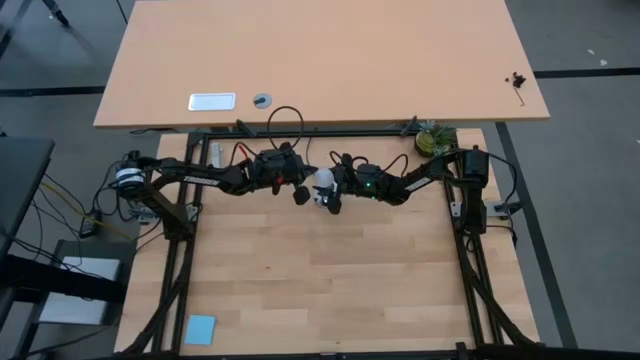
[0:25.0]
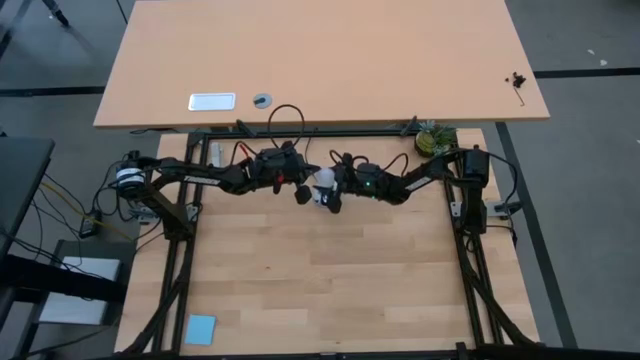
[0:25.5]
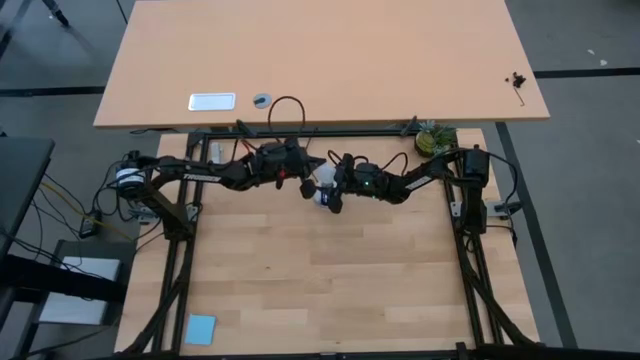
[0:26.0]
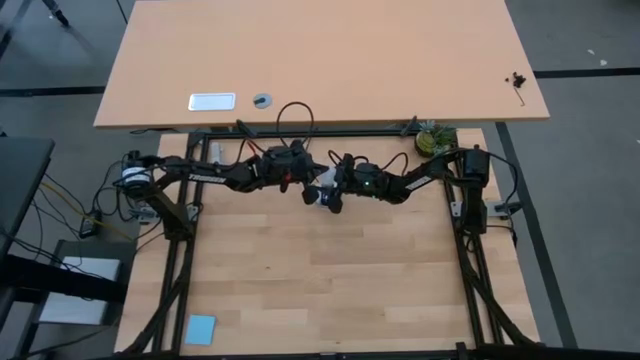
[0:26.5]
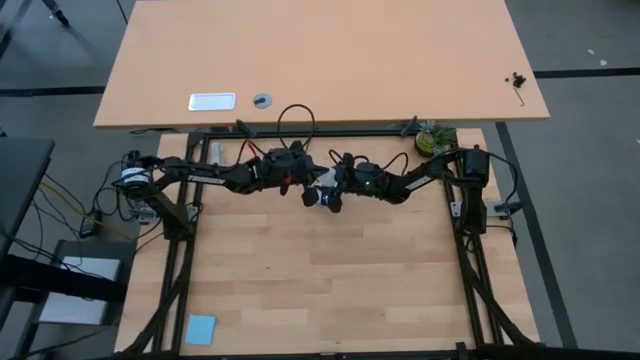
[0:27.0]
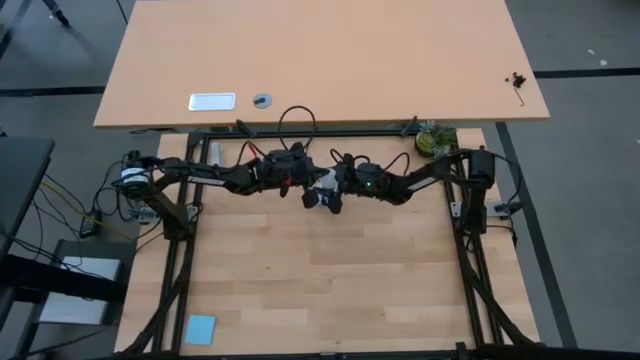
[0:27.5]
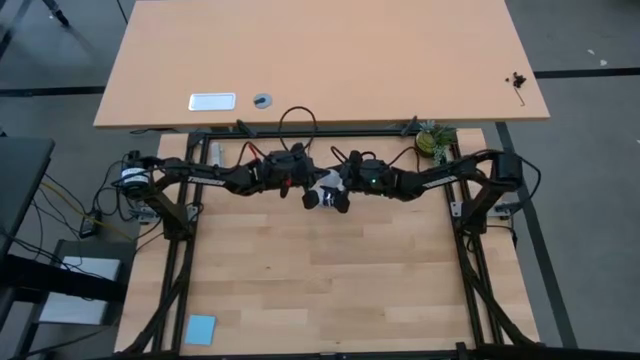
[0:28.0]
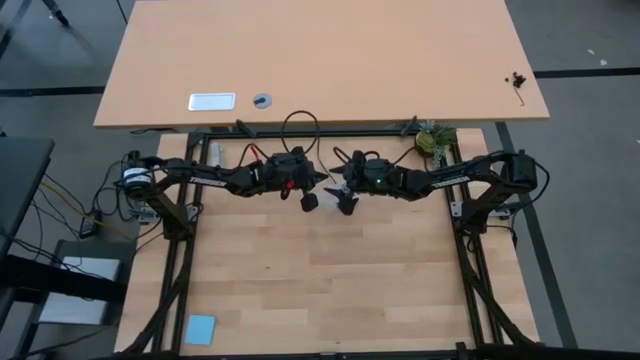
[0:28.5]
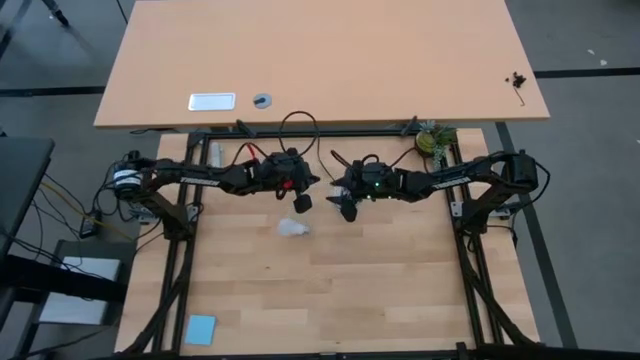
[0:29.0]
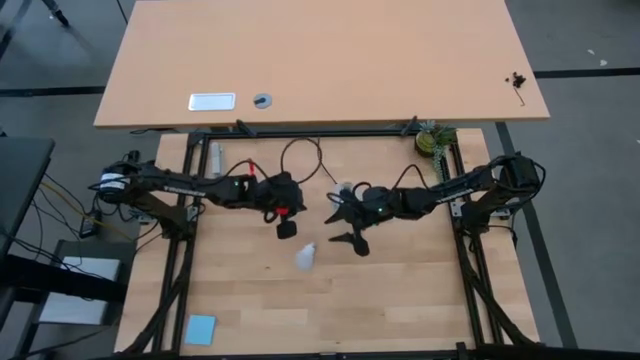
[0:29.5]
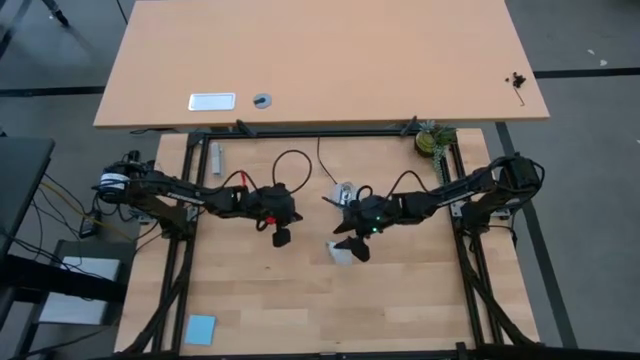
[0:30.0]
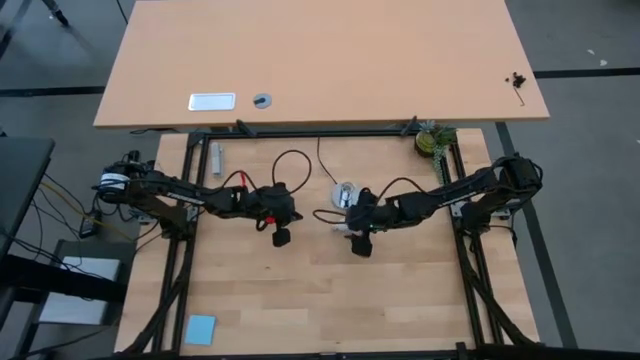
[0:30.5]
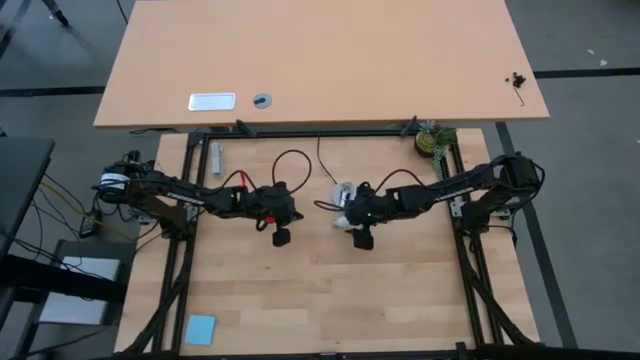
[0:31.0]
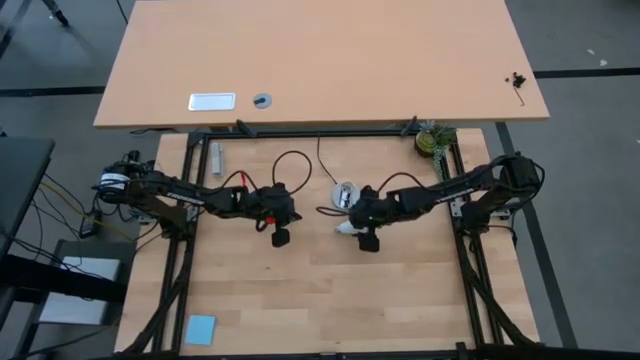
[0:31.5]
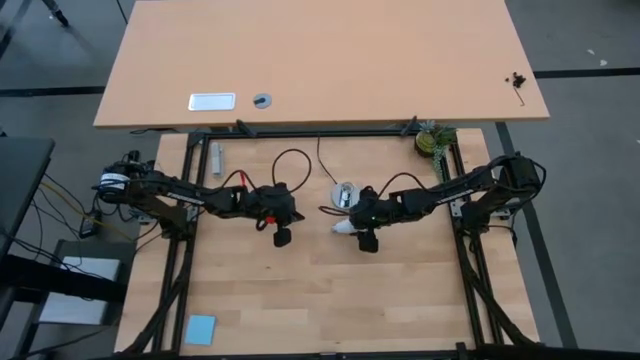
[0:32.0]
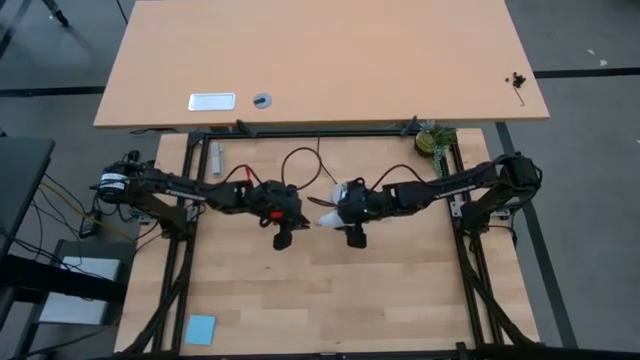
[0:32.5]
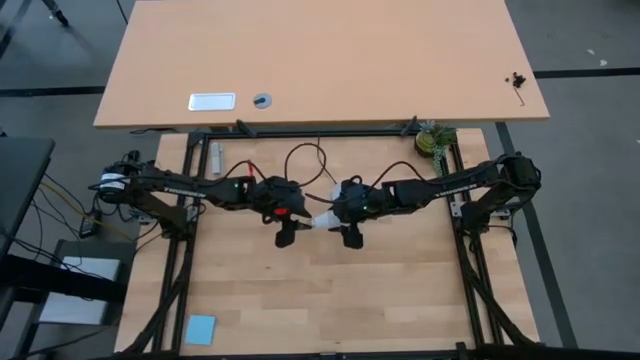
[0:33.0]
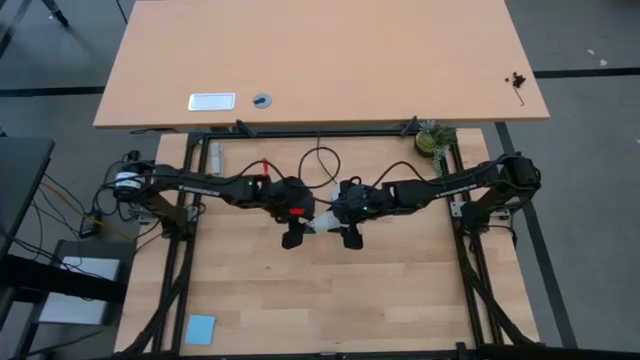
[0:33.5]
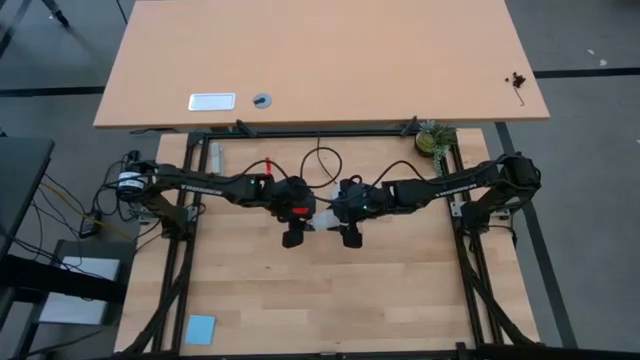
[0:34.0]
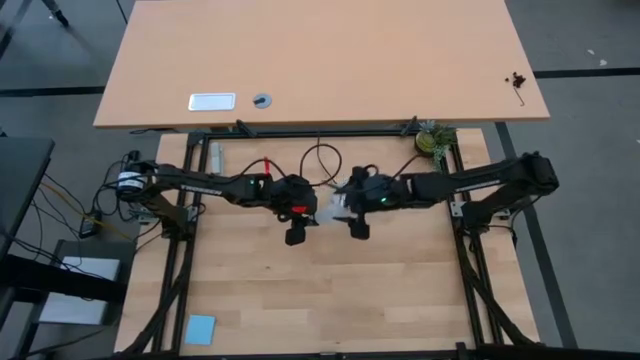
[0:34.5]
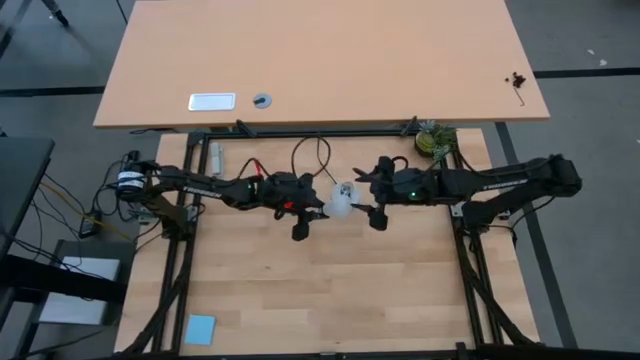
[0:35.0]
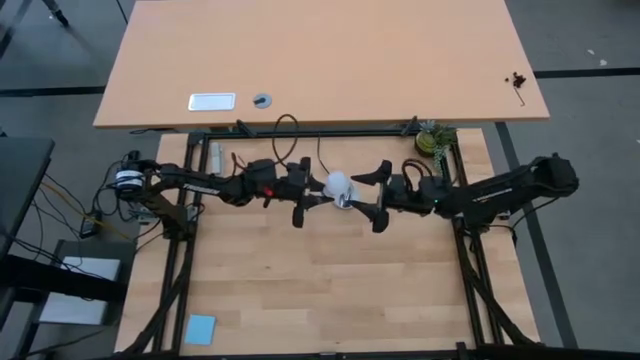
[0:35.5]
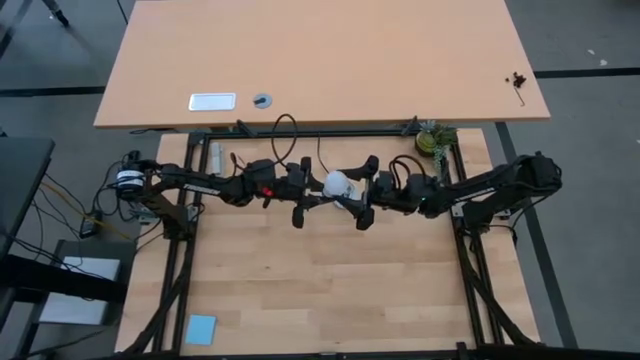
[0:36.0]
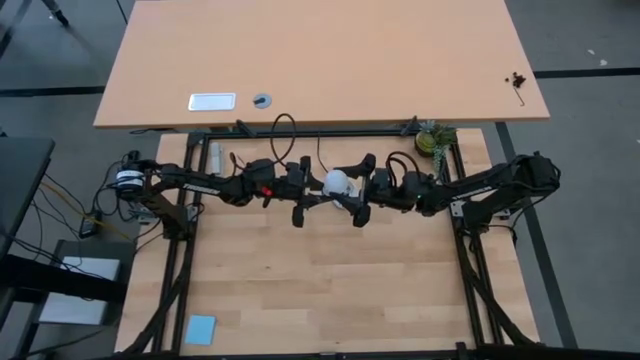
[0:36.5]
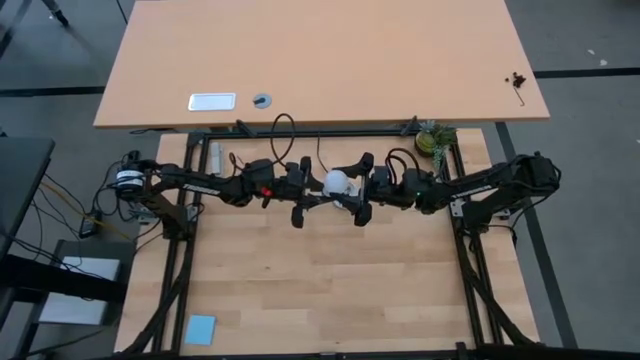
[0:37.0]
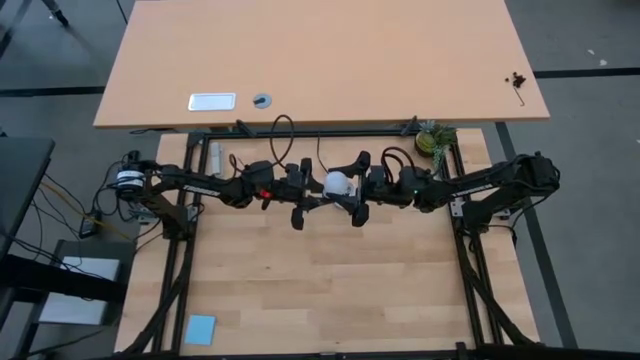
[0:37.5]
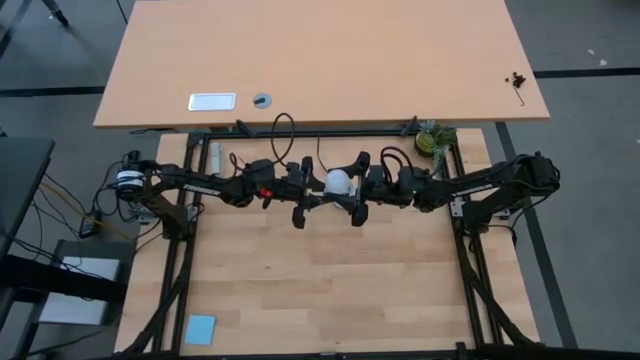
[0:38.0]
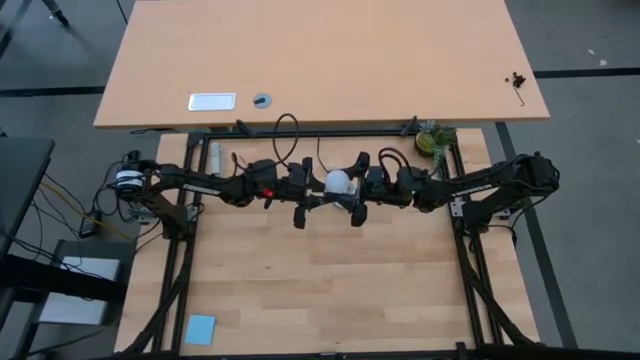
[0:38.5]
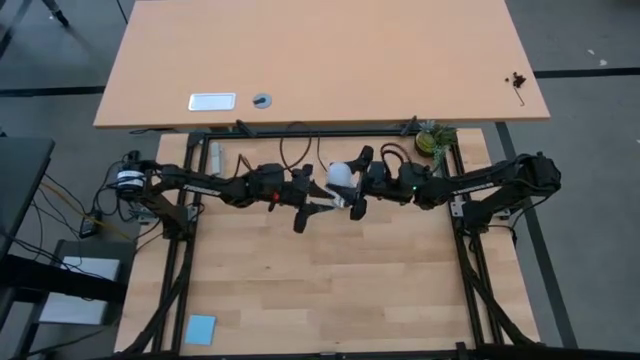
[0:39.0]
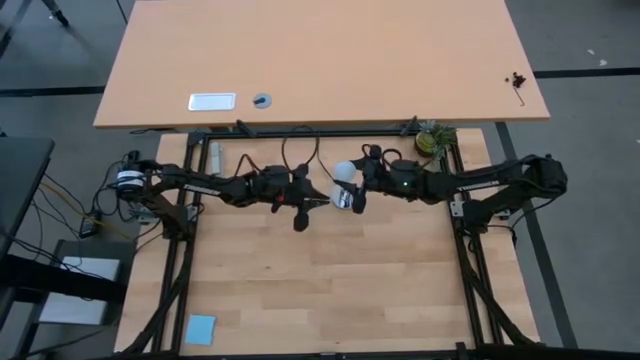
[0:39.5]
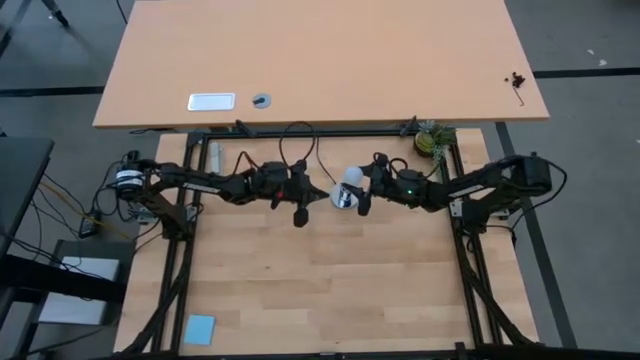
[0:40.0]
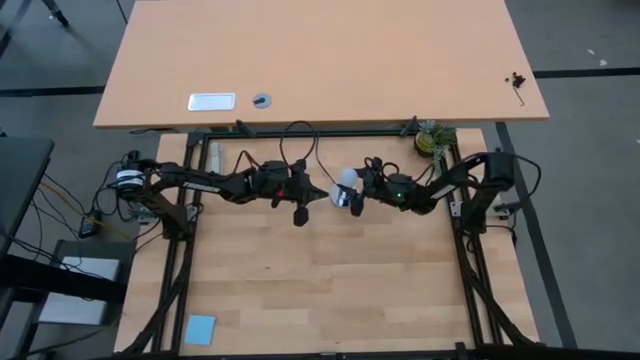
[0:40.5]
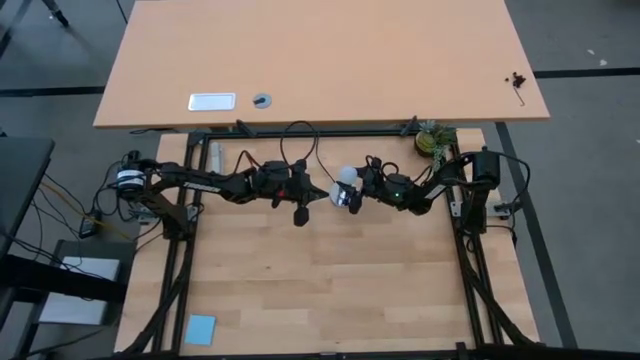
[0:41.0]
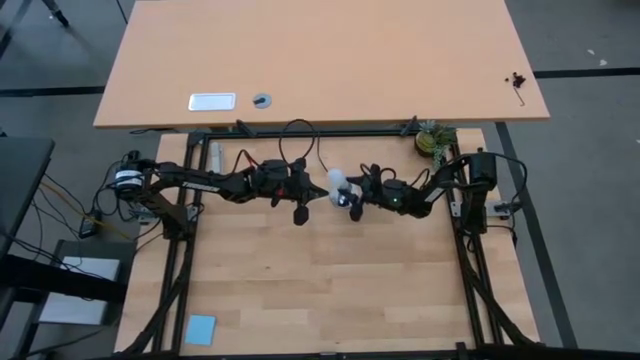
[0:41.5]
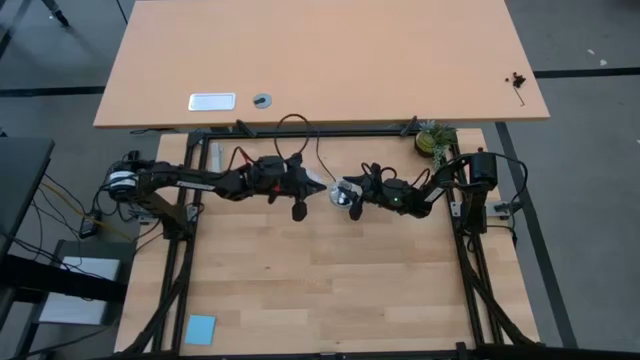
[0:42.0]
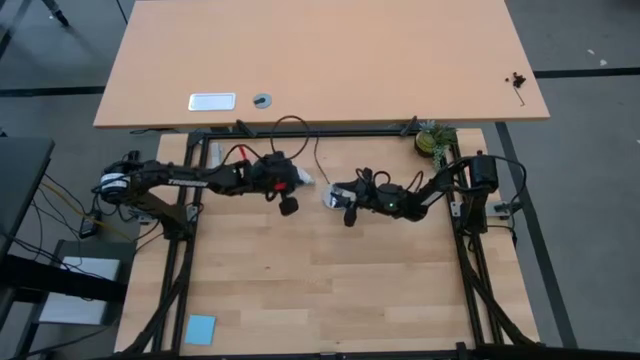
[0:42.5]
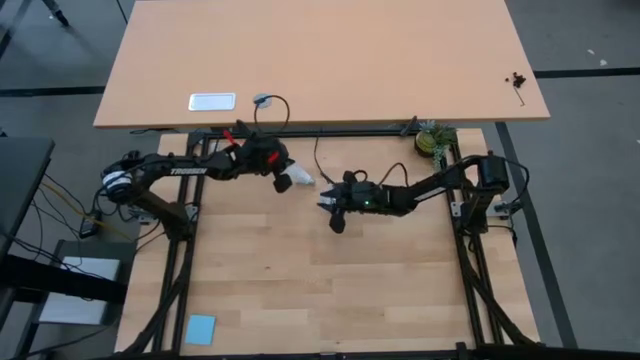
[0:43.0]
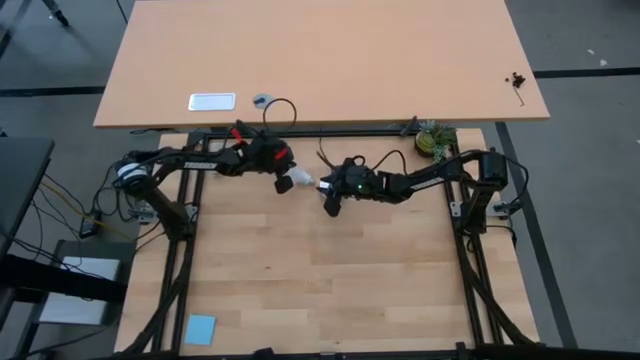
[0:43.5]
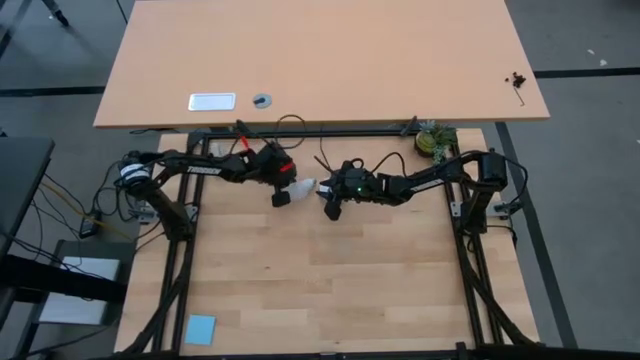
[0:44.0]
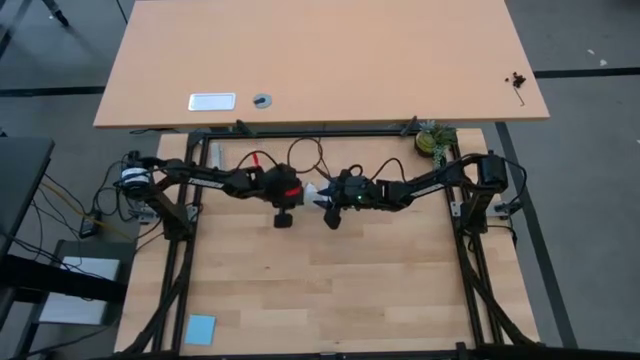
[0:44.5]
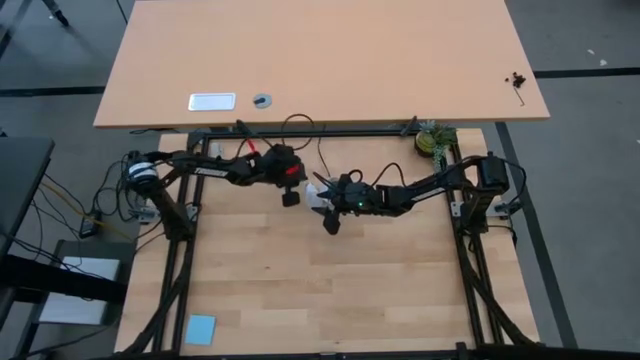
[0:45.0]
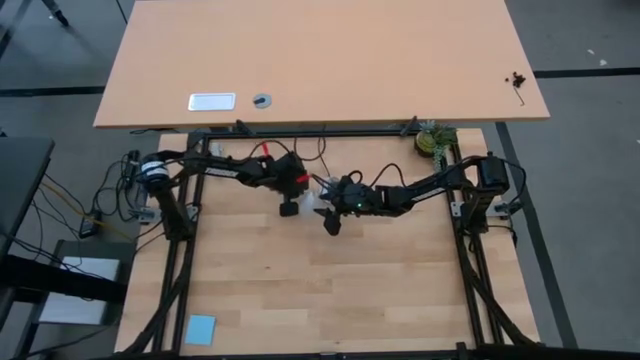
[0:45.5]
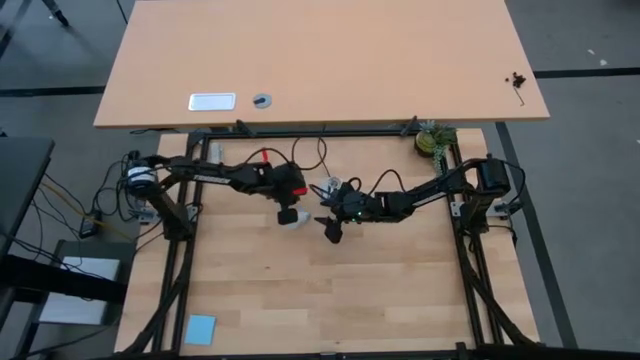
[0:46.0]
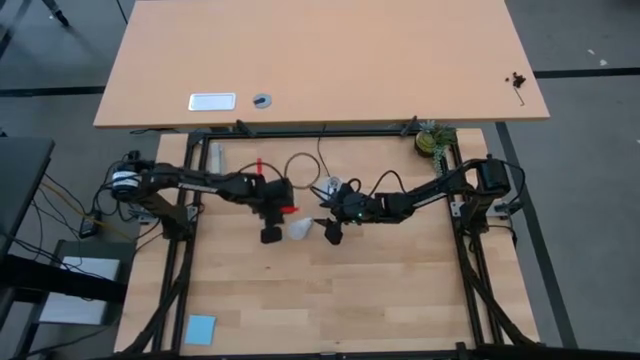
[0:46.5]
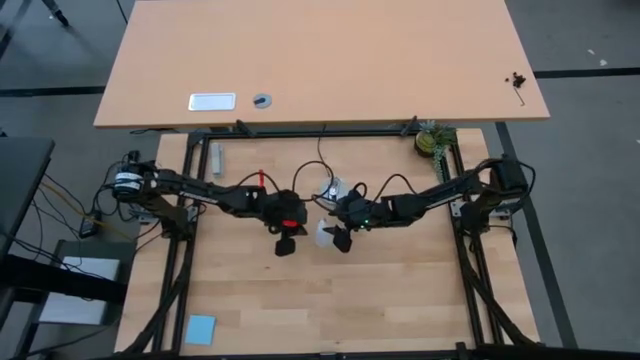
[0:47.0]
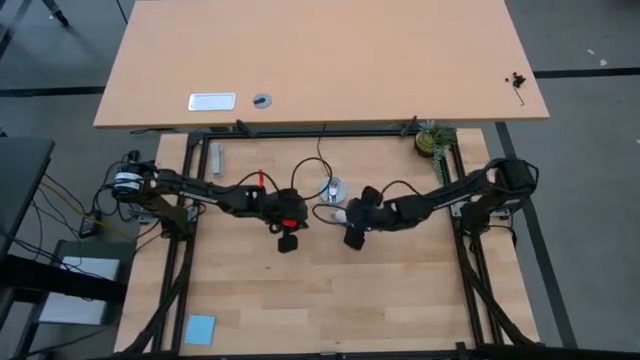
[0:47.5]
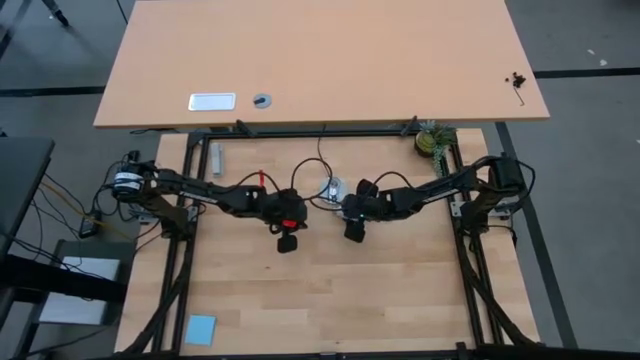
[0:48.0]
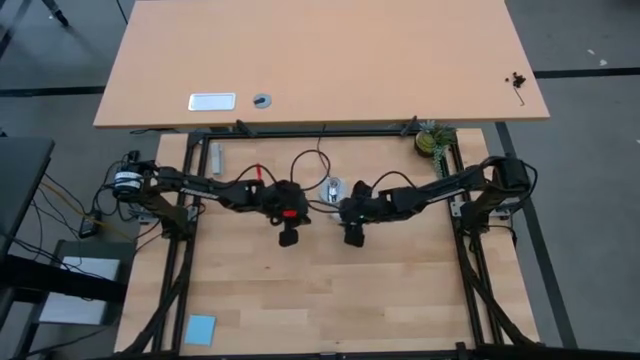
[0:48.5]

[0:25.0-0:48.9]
Task: Screw lightbulb
Insert the lightbulb into the lamp
